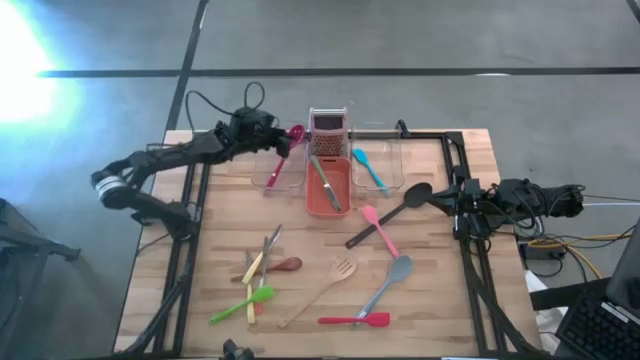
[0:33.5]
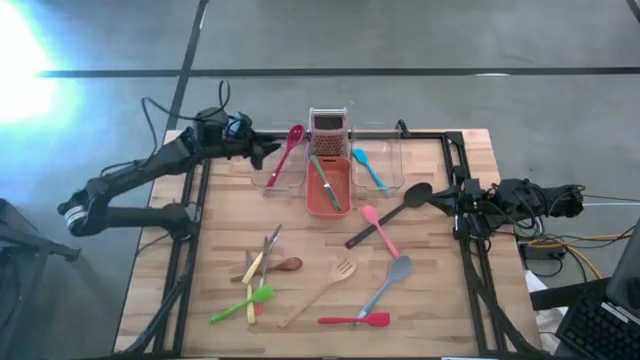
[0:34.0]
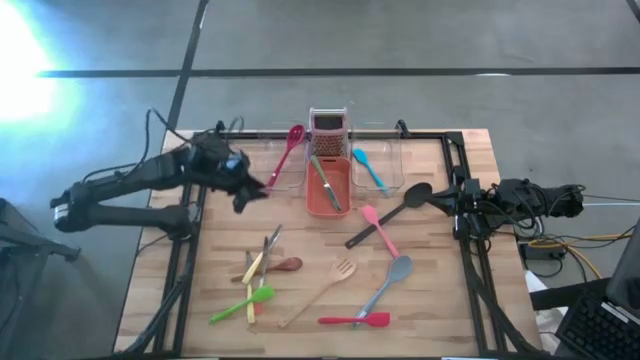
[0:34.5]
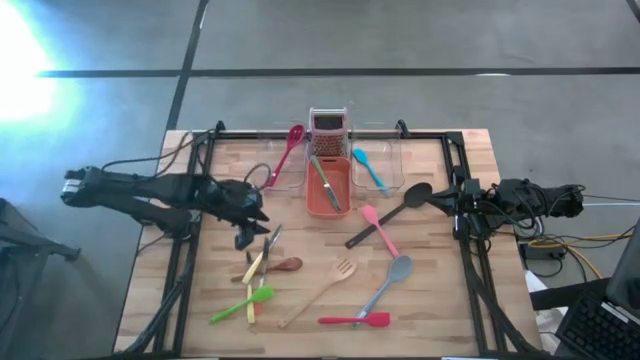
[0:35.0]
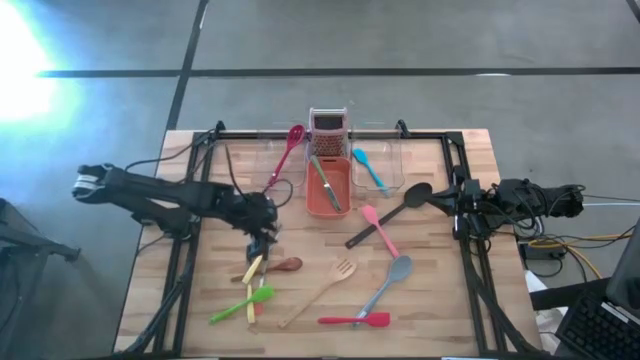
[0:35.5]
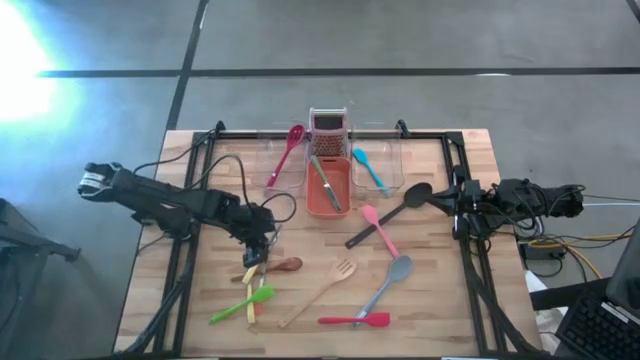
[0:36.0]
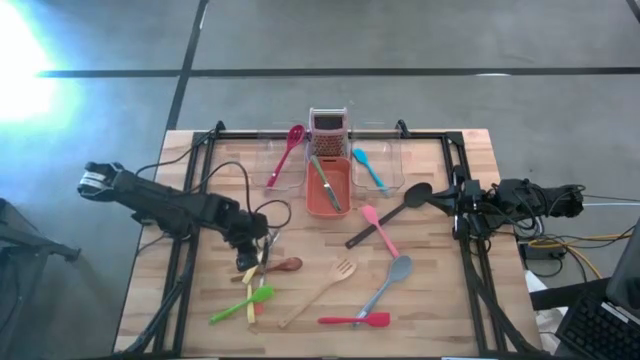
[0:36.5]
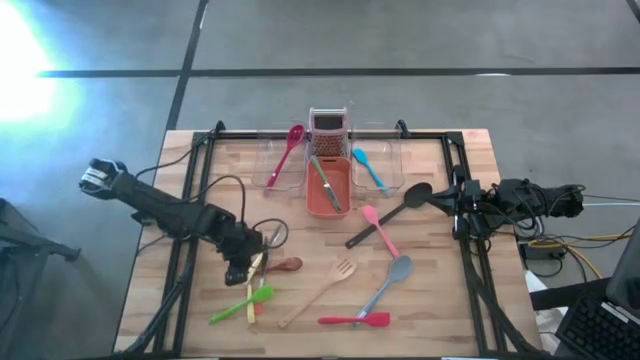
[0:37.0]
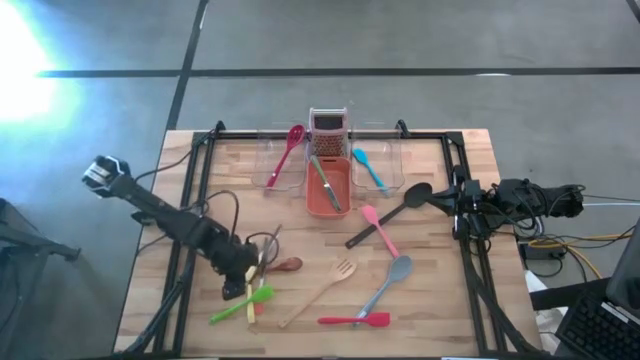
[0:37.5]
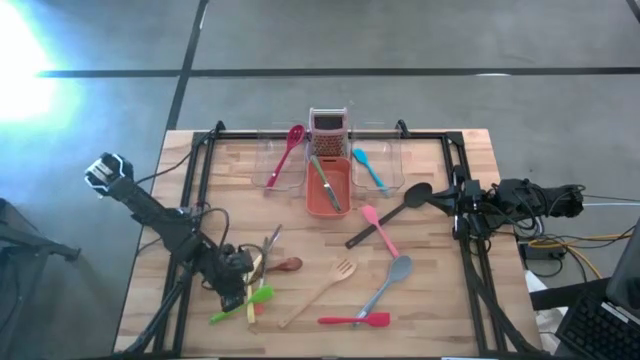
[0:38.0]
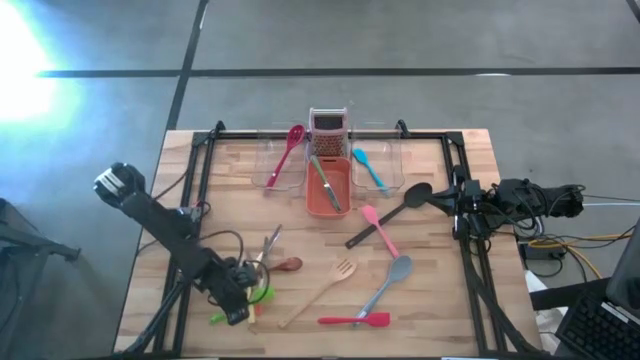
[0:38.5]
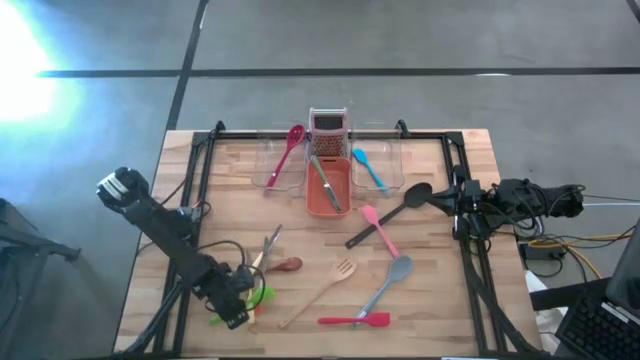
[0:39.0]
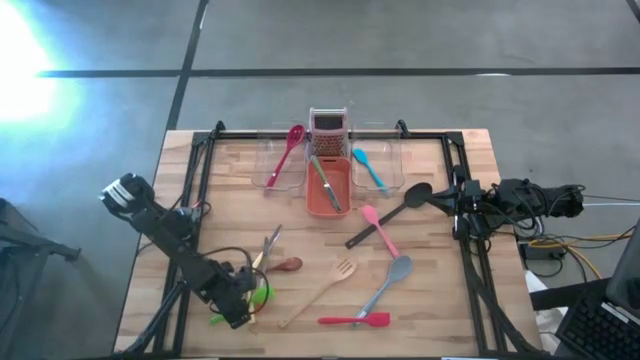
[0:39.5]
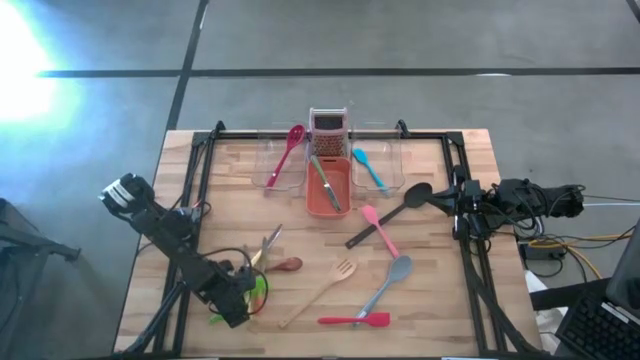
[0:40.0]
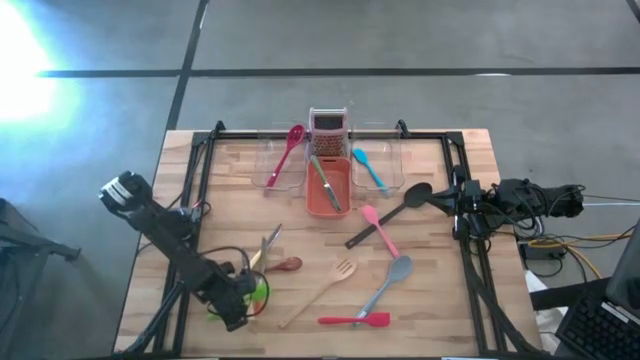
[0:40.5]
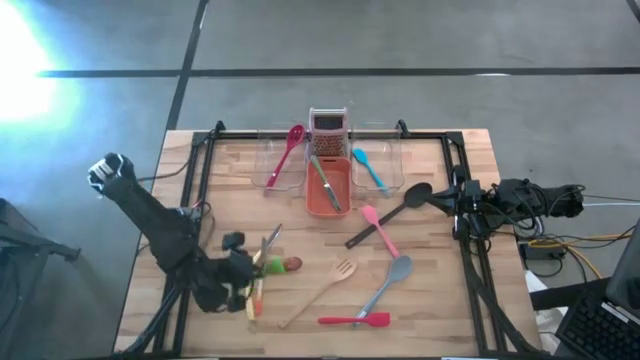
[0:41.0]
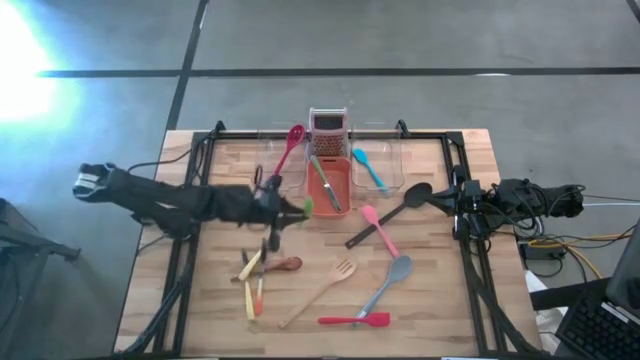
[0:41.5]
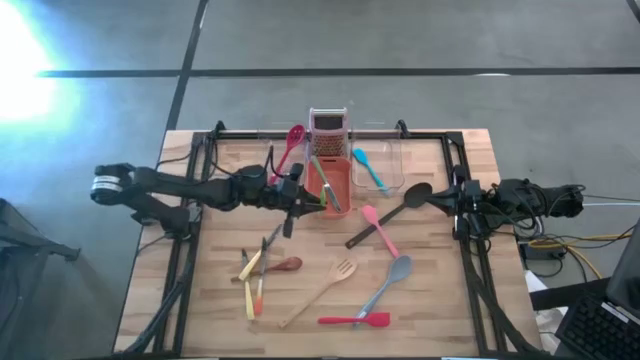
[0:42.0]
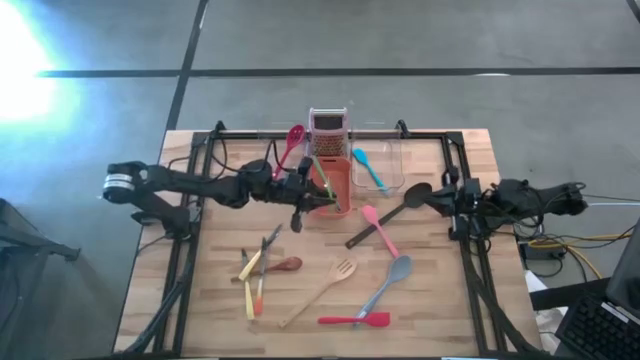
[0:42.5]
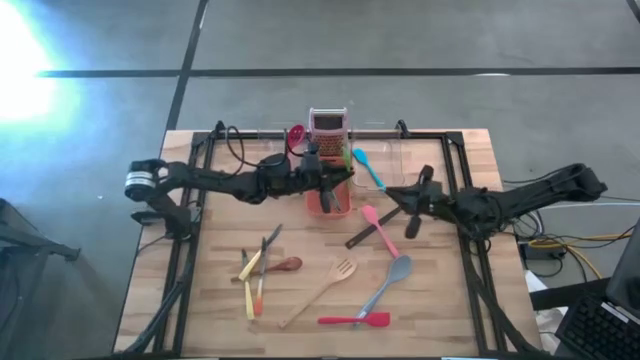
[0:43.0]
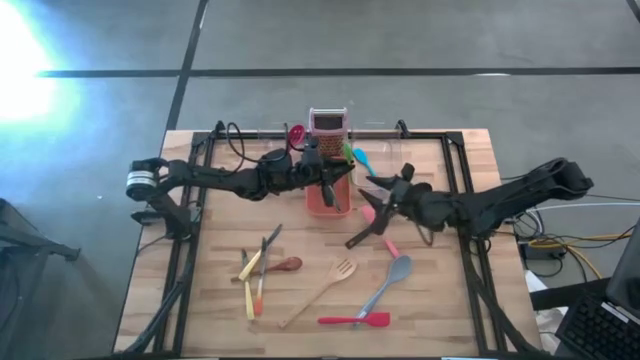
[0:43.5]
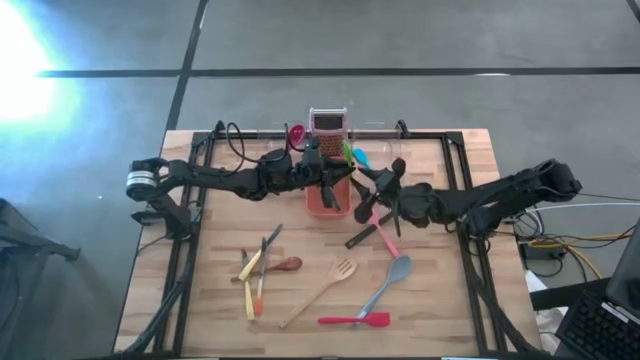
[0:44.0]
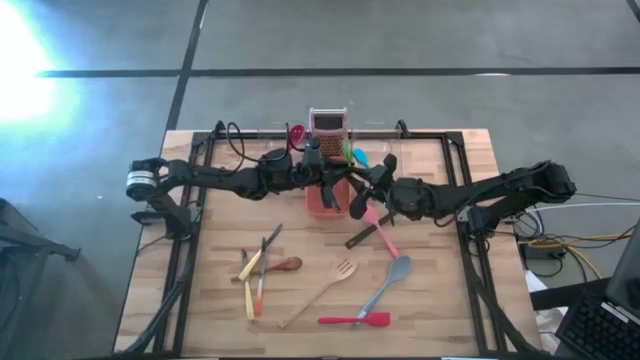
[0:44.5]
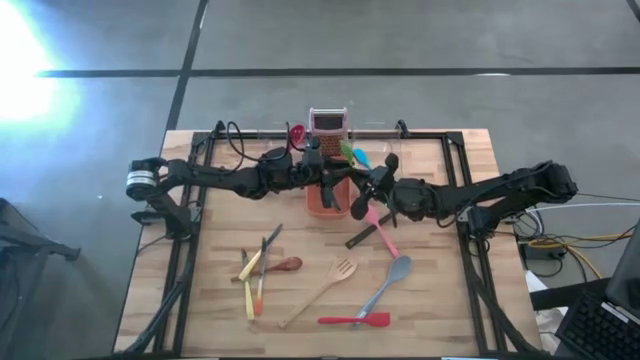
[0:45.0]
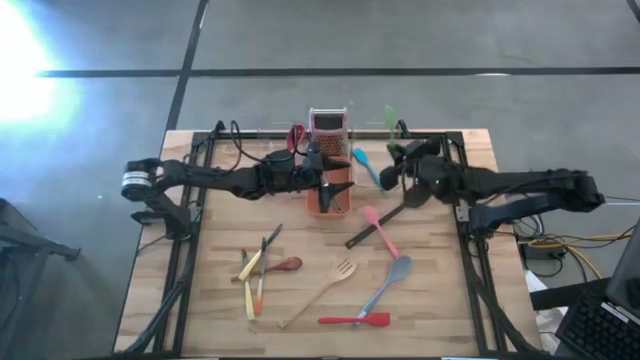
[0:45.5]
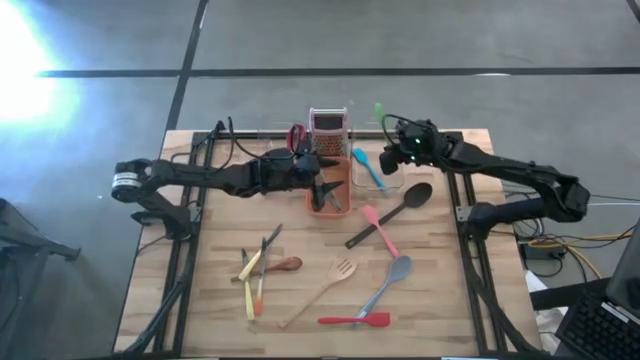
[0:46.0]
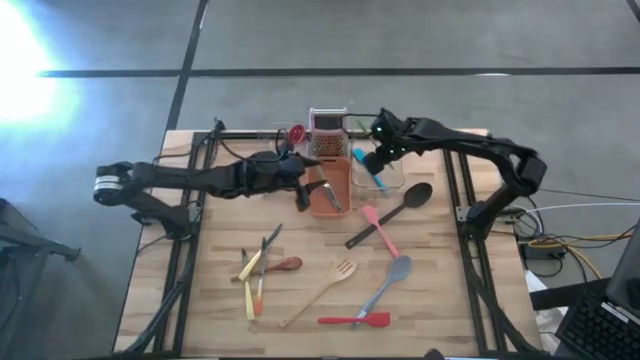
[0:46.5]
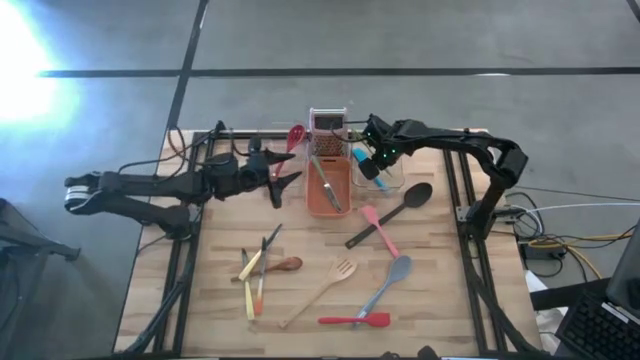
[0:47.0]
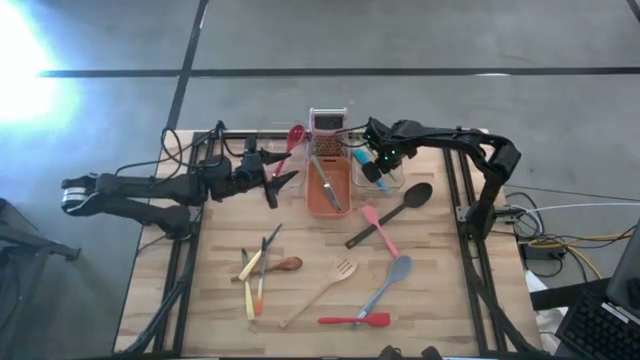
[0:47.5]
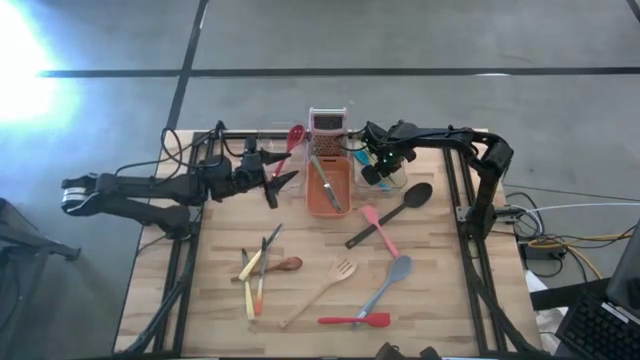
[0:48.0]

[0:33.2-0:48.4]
Task: Pick & Place Kitchen Items
Put the green spatula into the right transparent bin

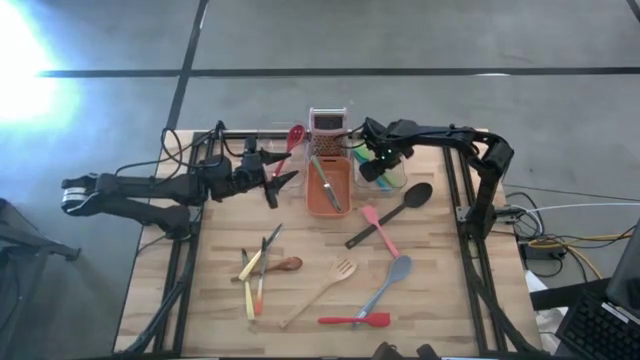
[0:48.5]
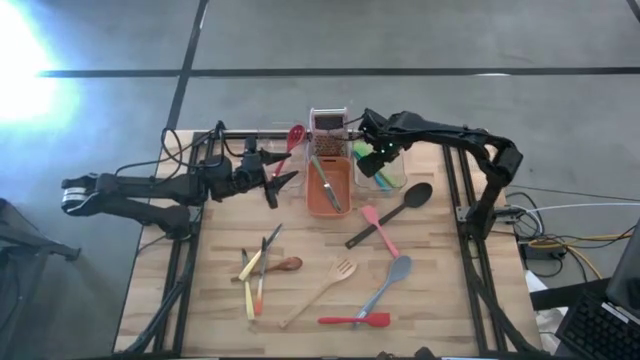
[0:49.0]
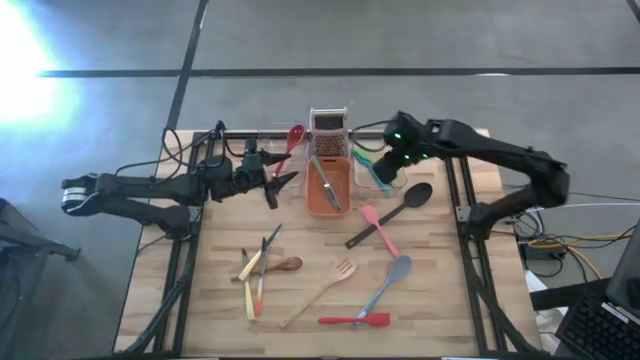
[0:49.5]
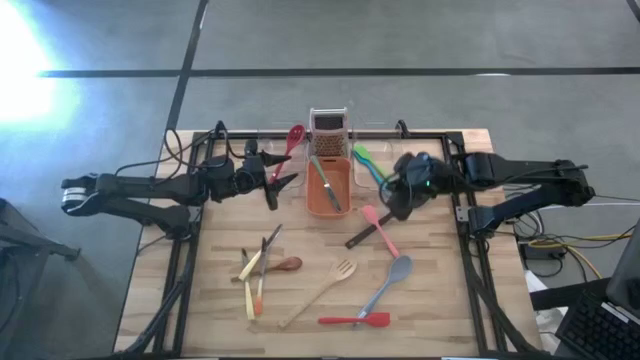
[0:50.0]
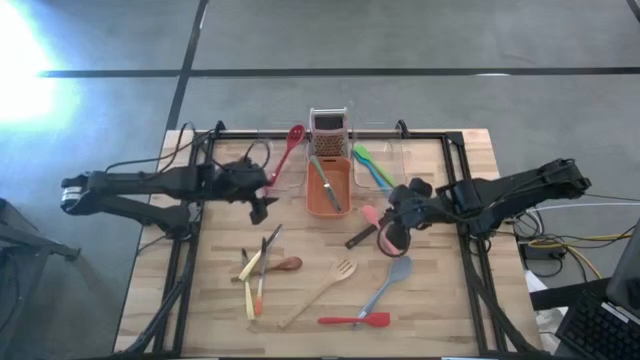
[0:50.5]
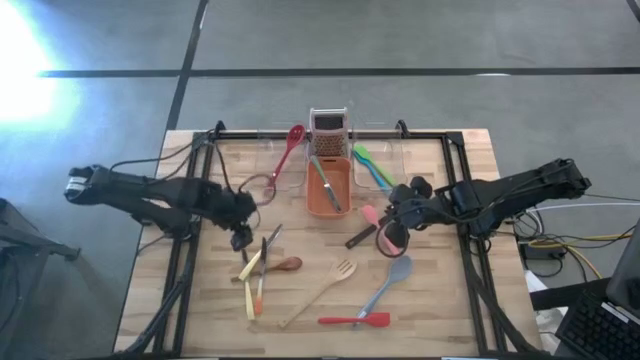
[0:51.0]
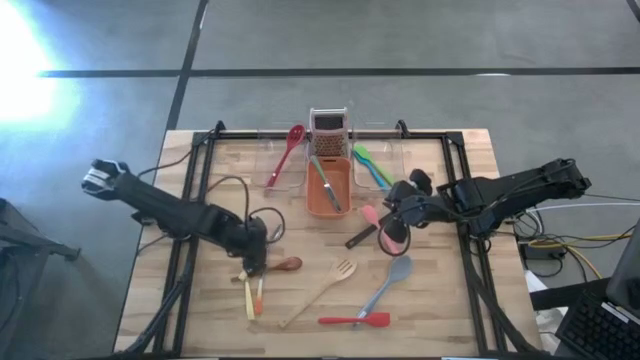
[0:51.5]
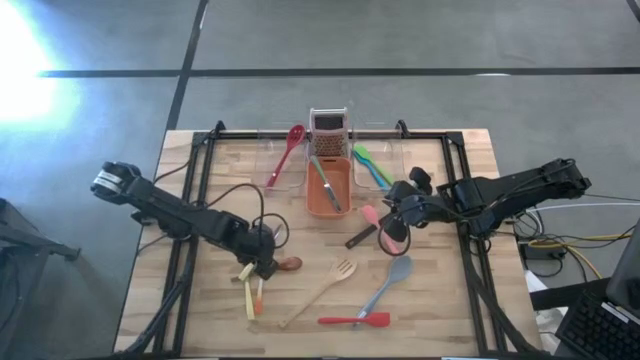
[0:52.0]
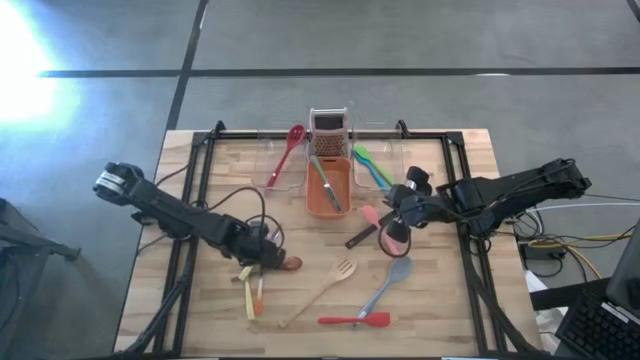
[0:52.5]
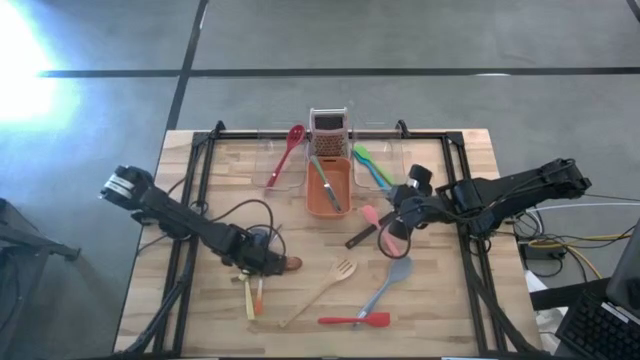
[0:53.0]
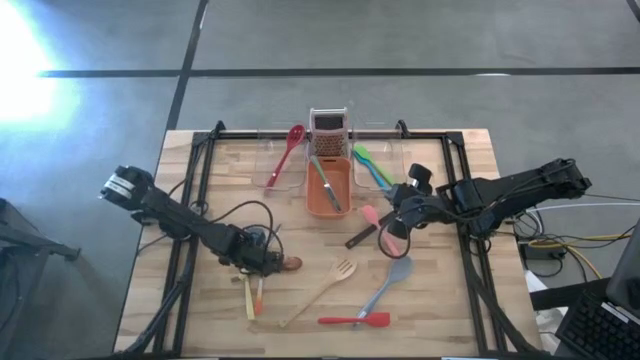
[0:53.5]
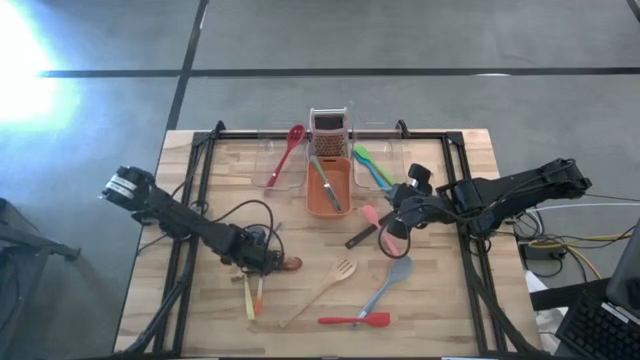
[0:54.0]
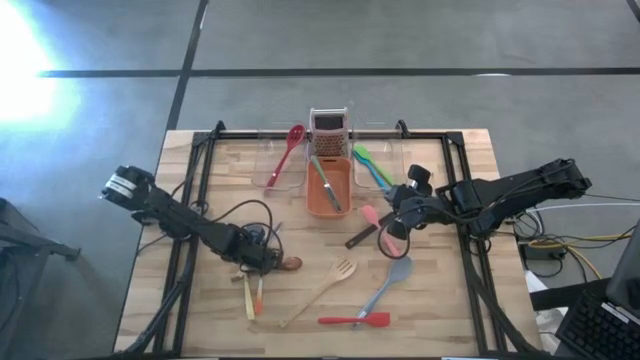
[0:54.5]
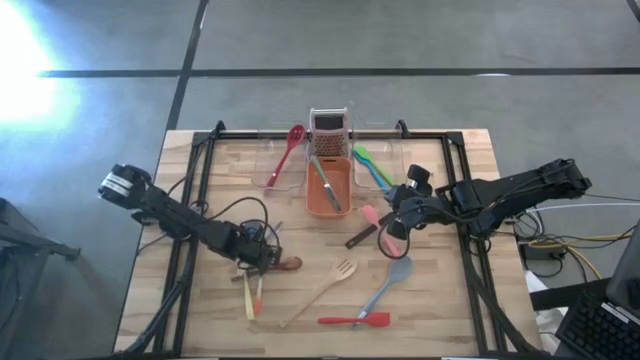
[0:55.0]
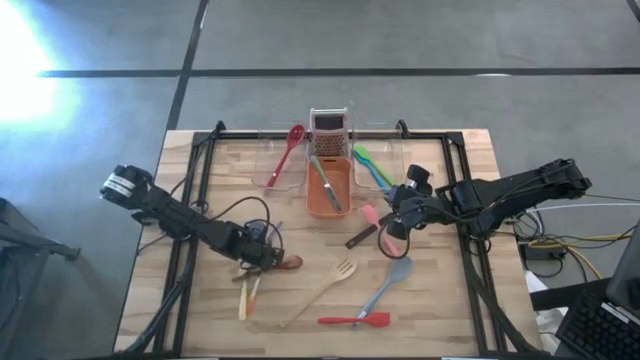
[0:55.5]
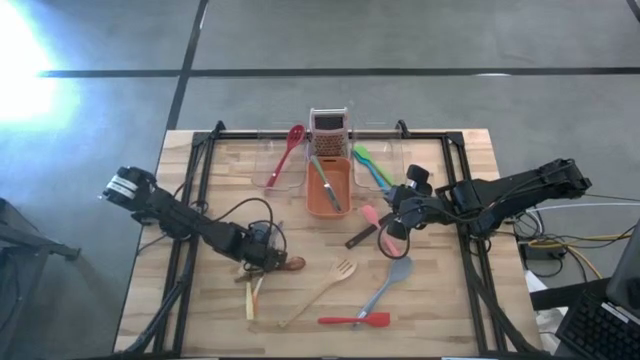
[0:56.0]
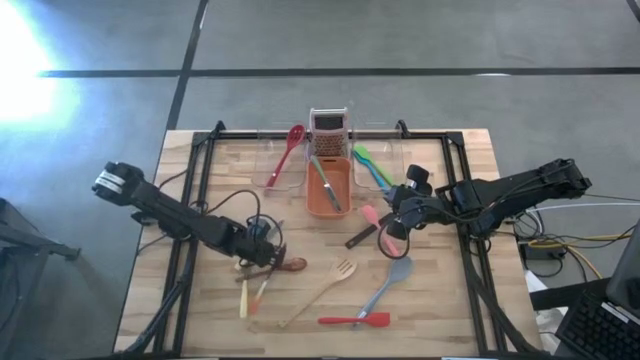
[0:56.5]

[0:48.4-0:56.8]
Put the orange table knife into the orange bin
